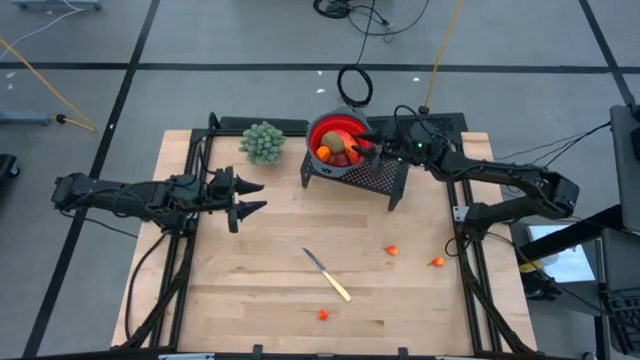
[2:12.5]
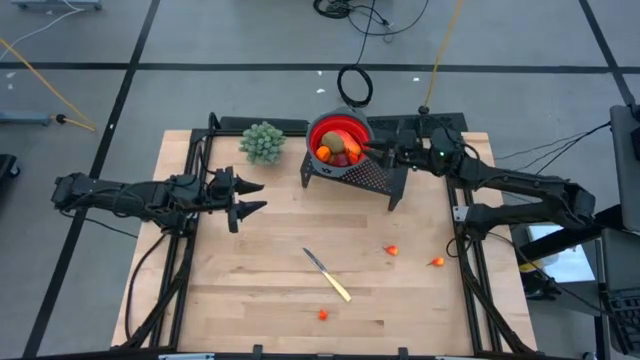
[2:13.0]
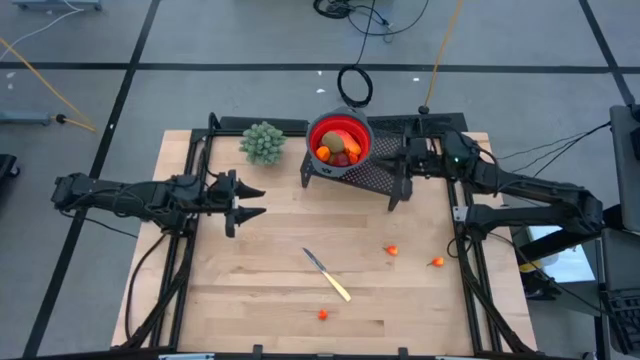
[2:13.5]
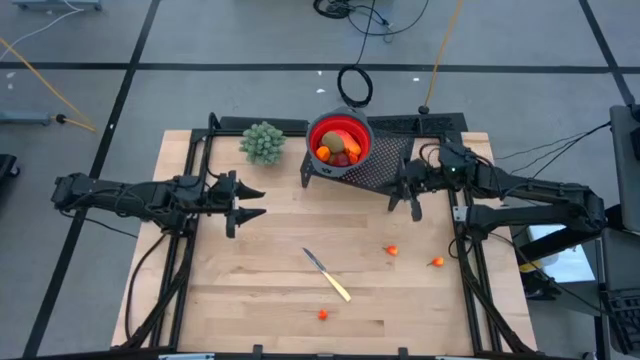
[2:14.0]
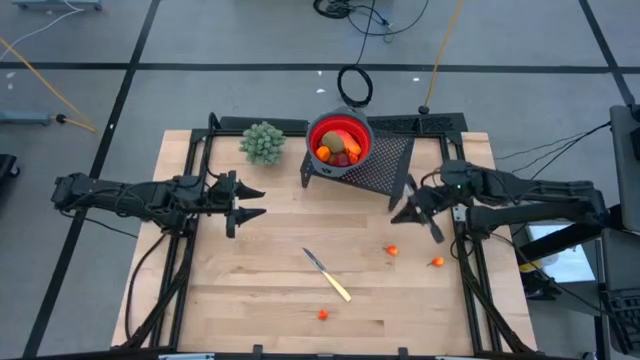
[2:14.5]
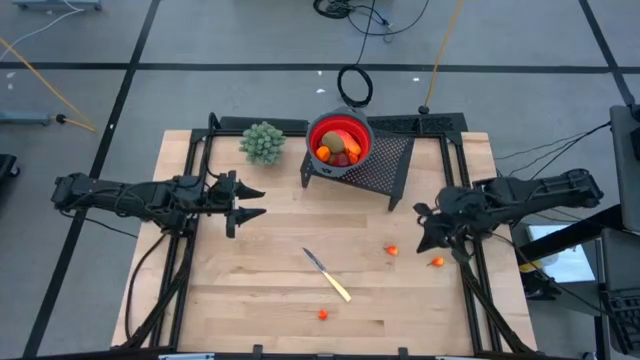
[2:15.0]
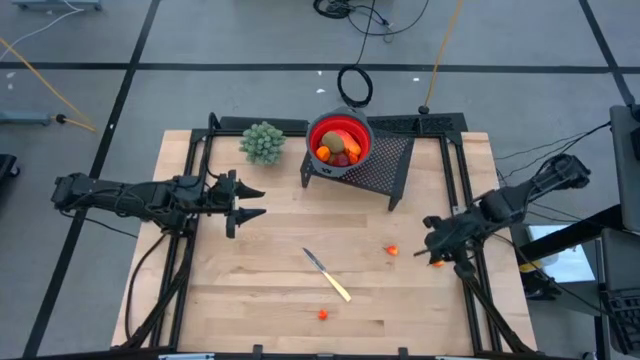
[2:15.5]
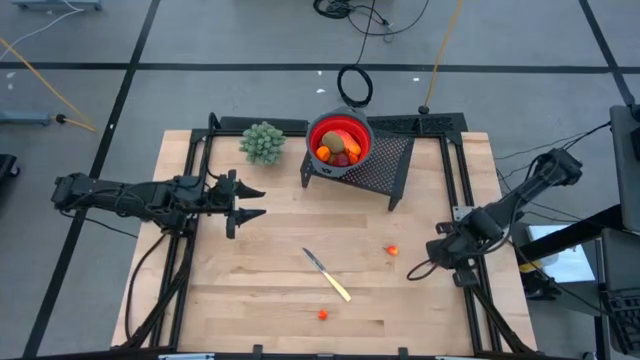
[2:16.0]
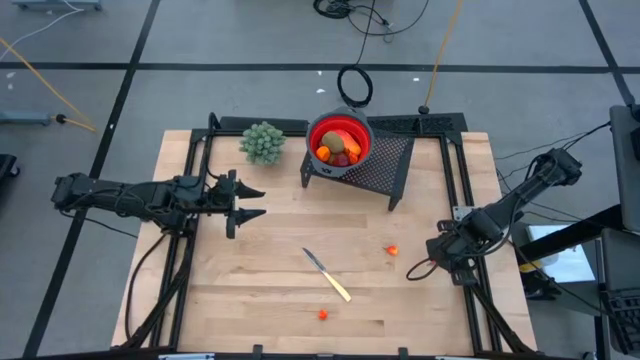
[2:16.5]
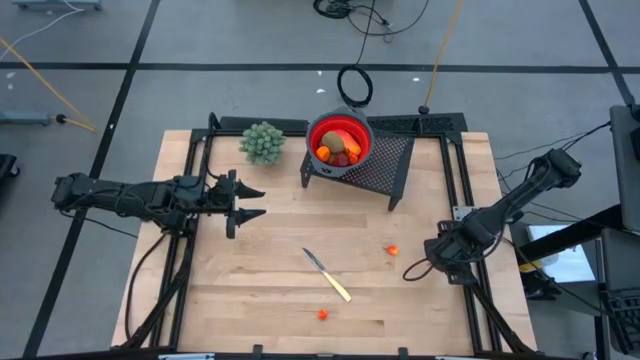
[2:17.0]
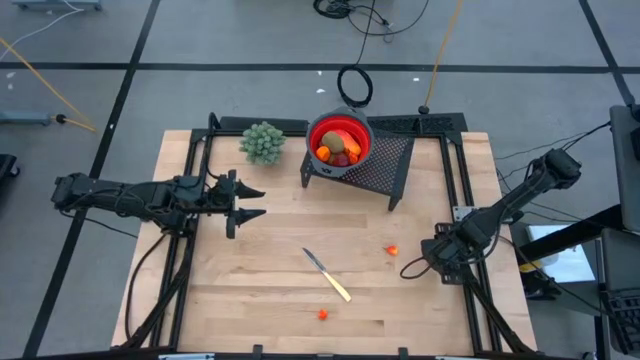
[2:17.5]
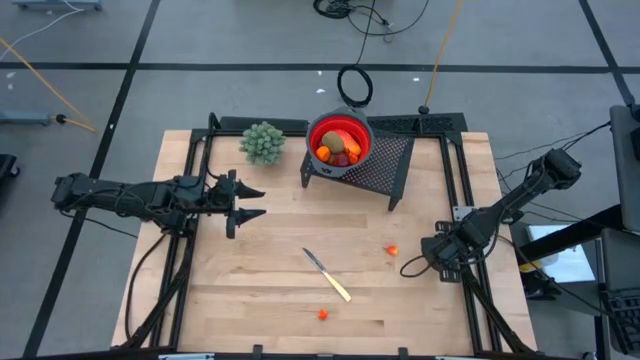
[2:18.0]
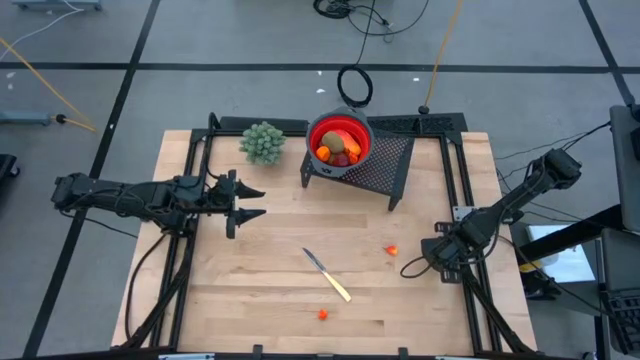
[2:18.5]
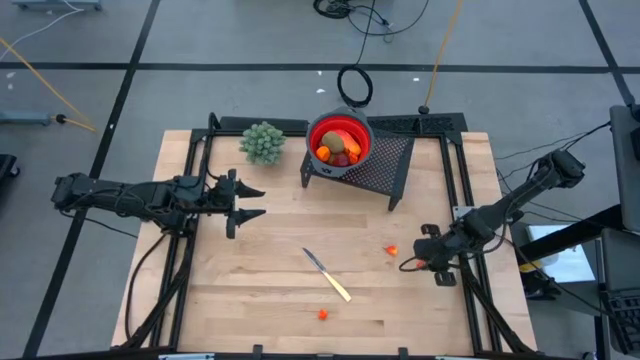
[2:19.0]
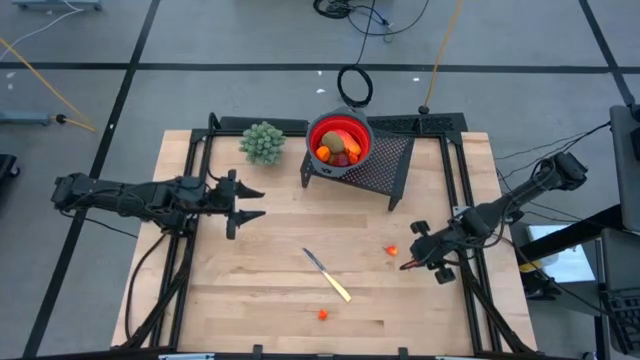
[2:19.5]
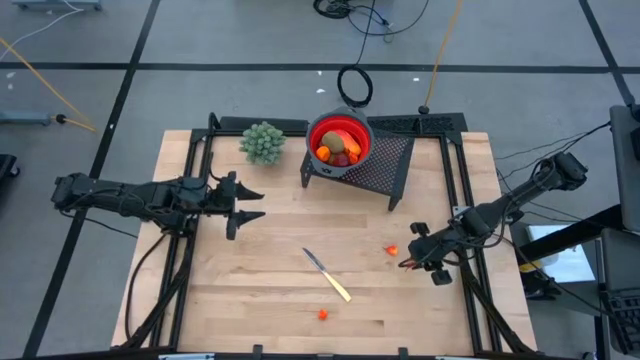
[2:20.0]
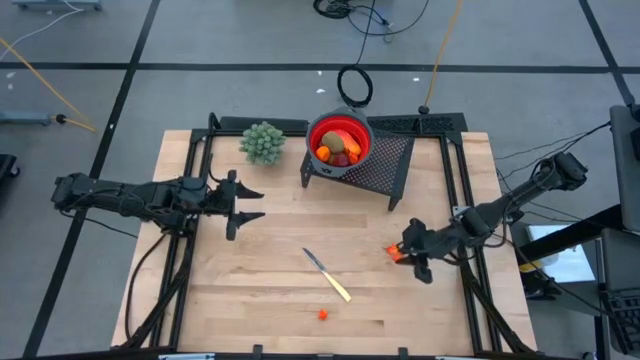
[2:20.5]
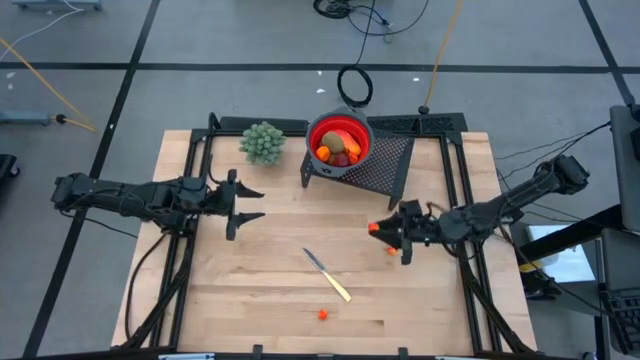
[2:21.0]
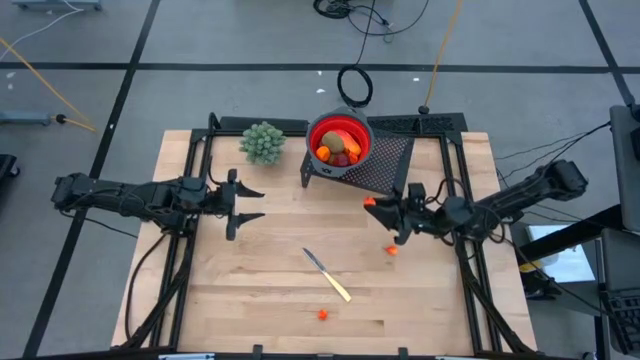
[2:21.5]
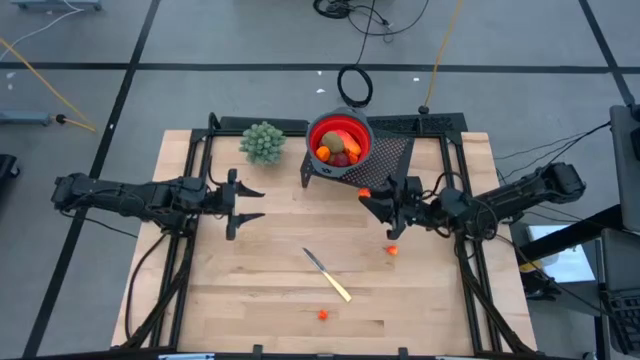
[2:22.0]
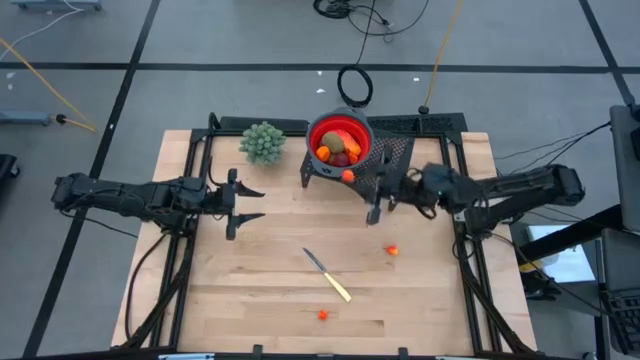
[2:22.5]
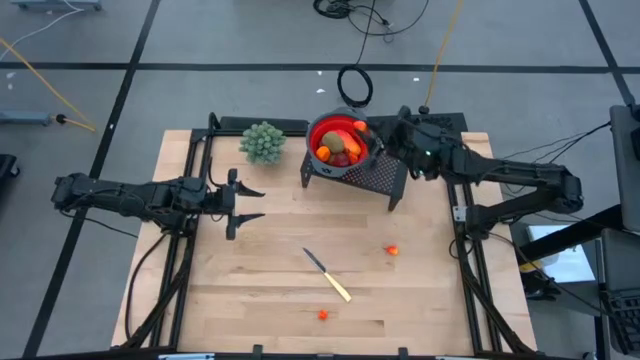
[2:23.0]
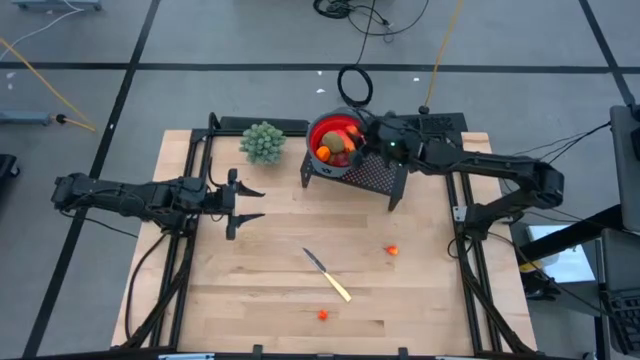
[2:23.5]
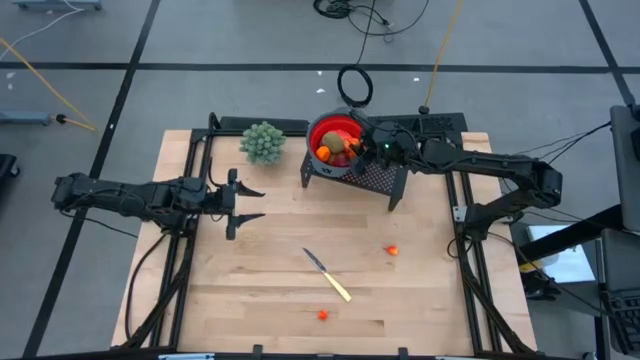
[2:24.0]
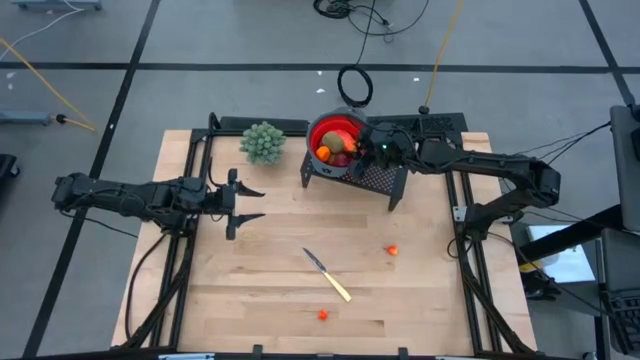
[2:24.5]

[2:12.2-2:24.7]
Task: Pick & Place Fruit
Put the yellow pear into the red strainer bowl on the shelf

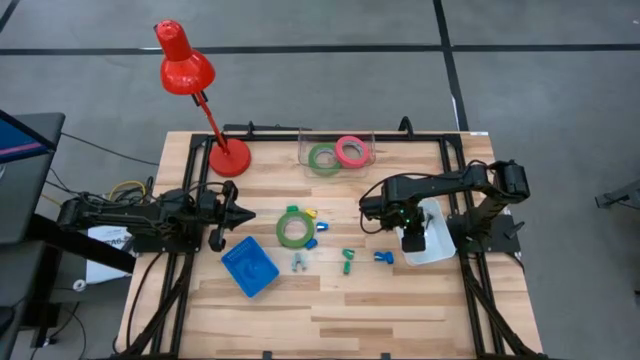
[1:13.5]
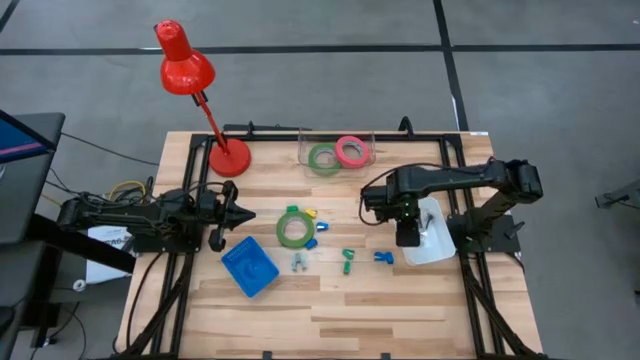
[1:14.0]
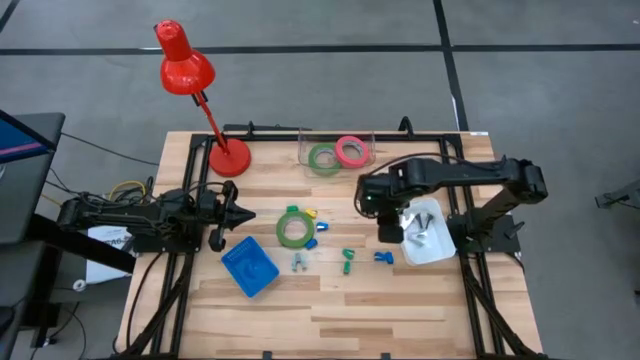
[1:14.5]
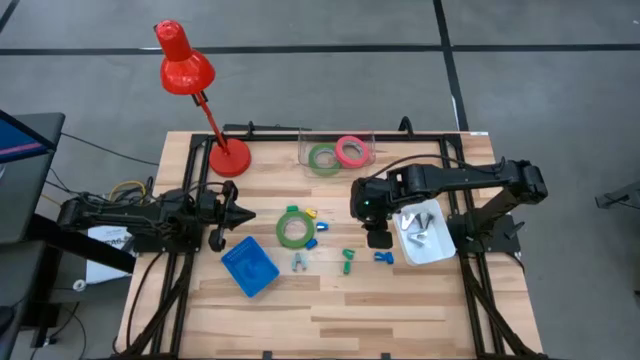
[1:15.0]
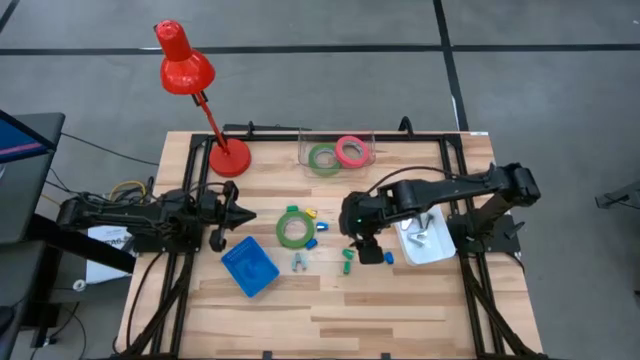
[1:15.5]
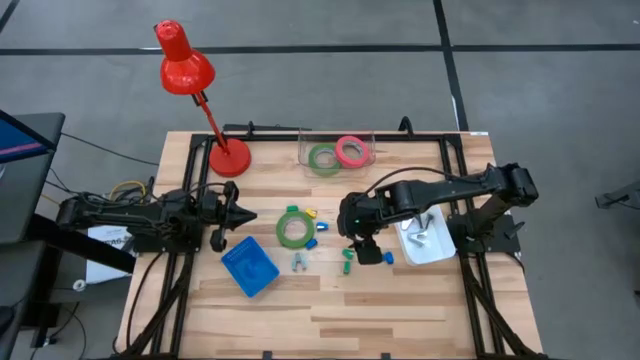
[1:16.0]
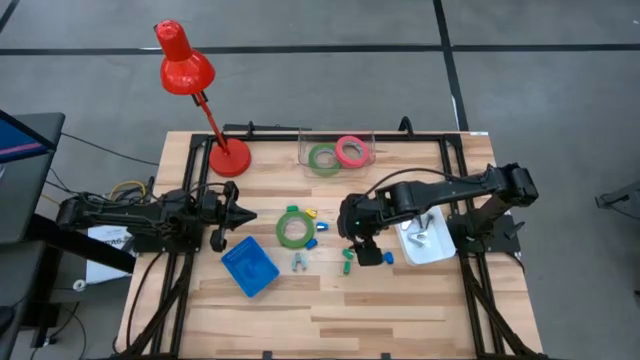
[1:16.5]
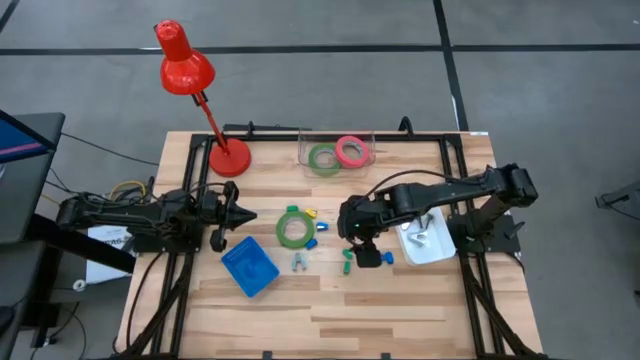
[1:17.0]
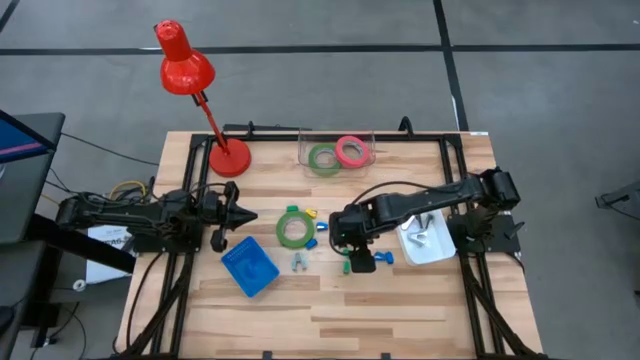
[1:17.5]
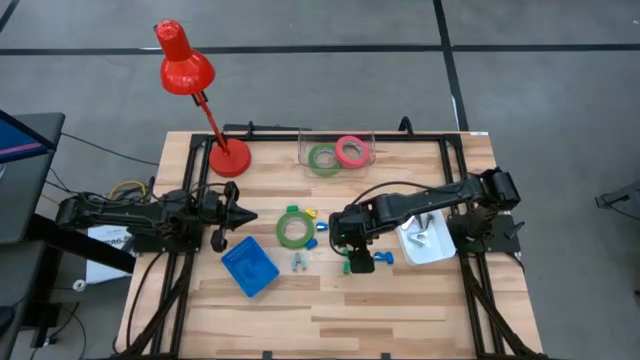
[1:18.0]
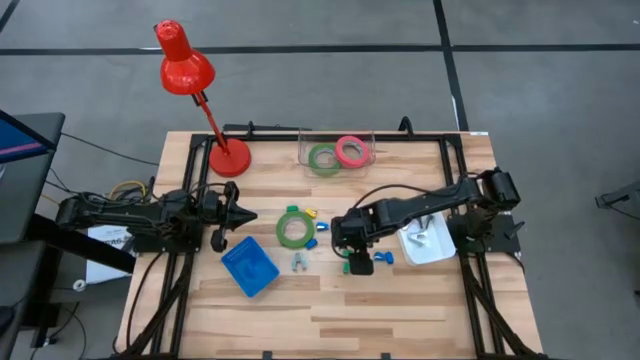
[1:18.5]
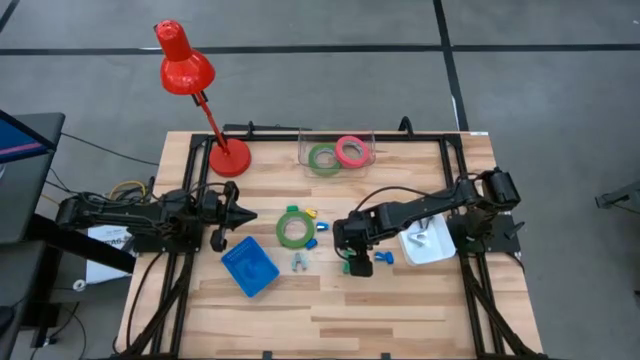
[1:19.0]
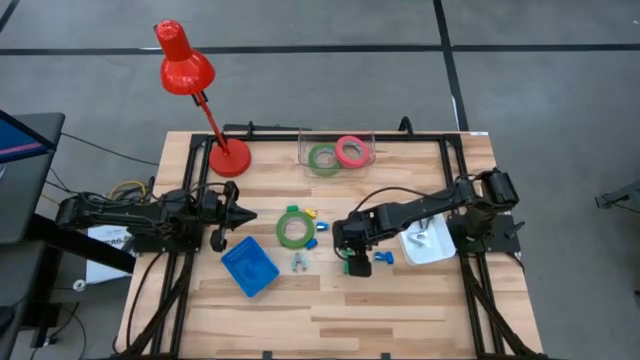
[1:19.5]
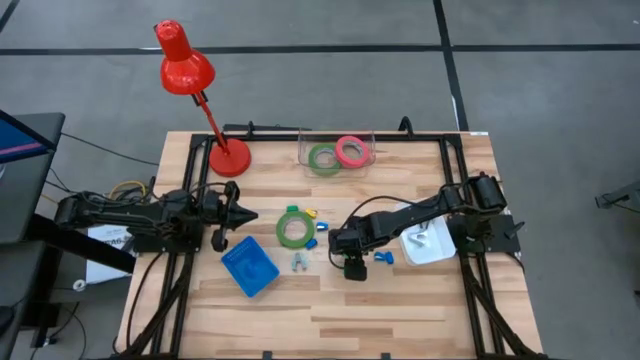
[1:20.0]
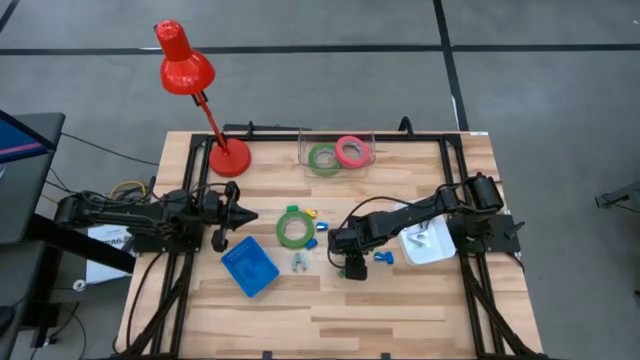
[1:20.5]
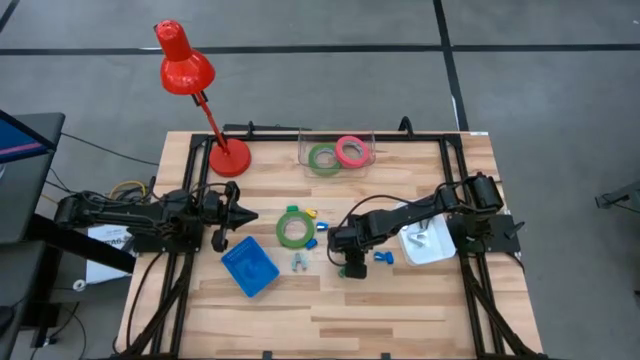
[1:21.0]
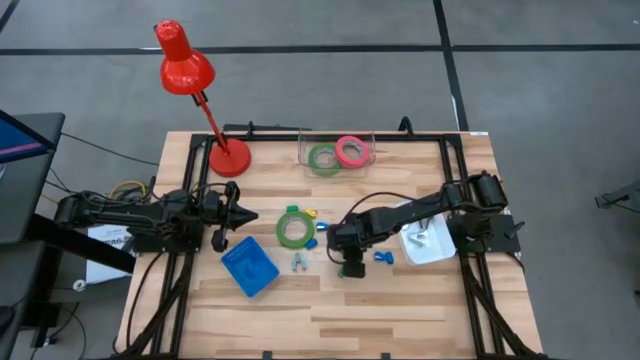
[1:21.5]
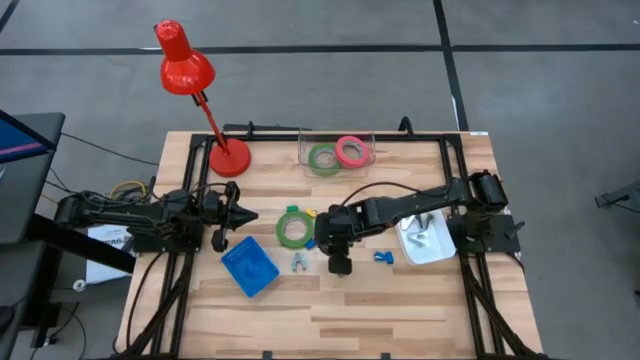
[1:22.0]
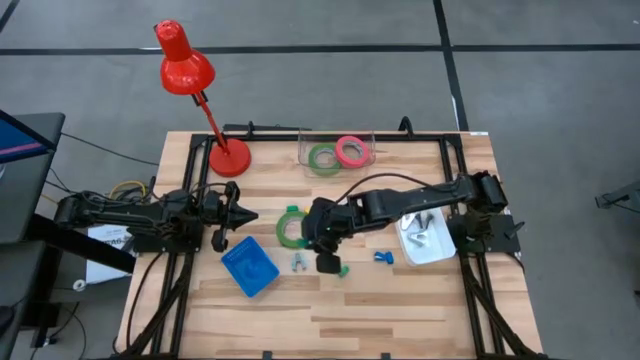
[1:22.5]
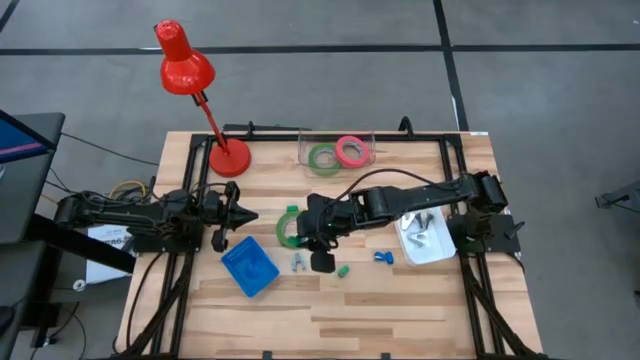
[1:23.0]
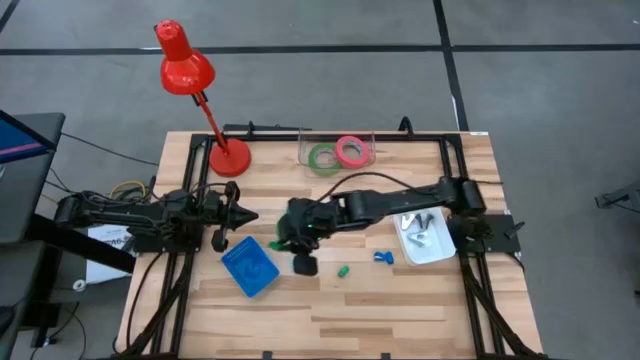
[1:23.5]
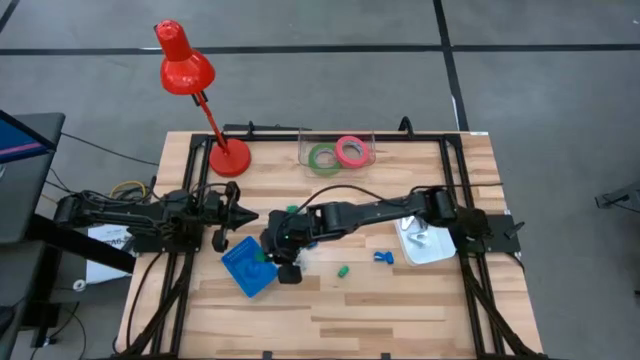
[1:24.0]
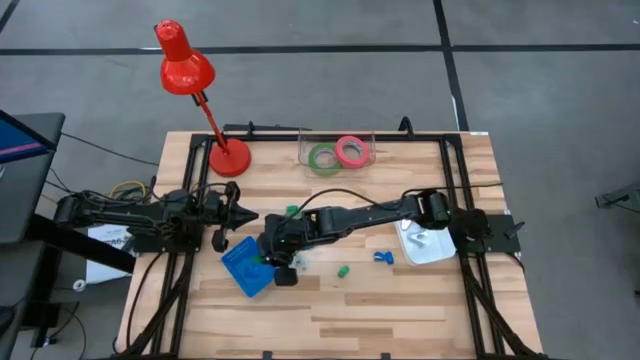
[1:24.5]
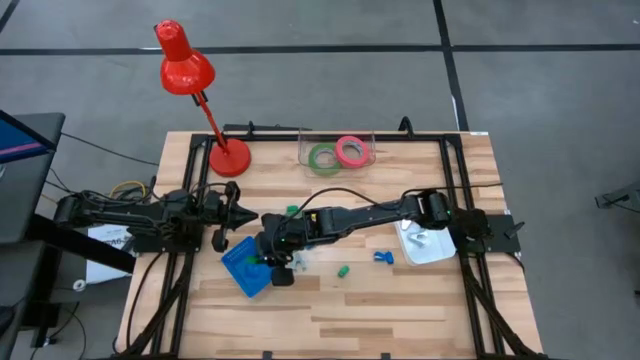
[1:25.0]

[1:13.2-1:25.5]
Task: Pick and place Stapler, Stapler remover, tape
Put the middle right green stapler into the blue bin
